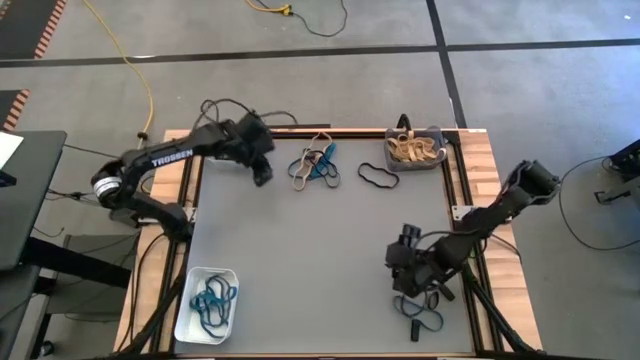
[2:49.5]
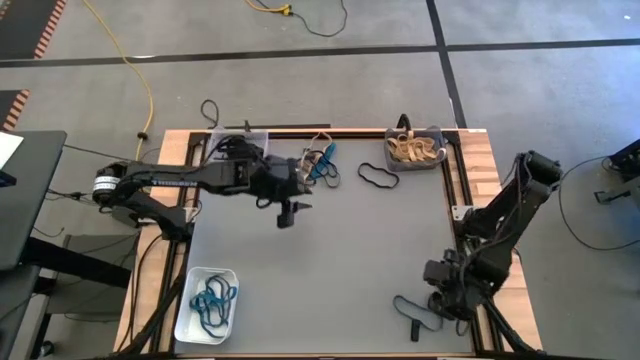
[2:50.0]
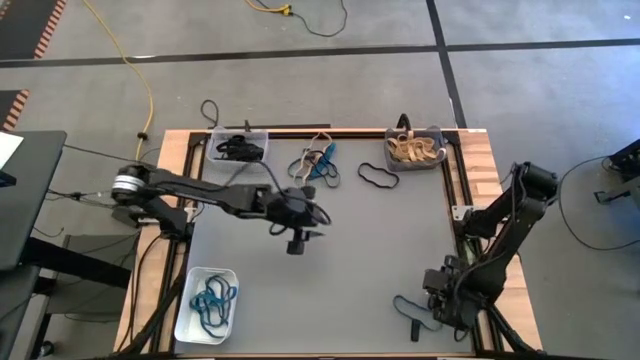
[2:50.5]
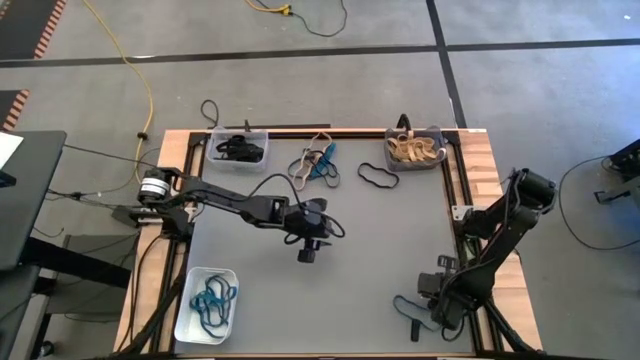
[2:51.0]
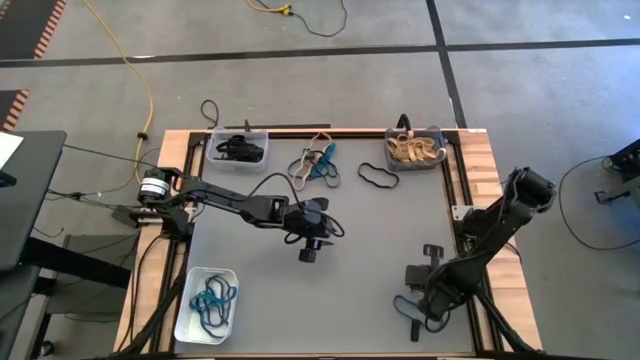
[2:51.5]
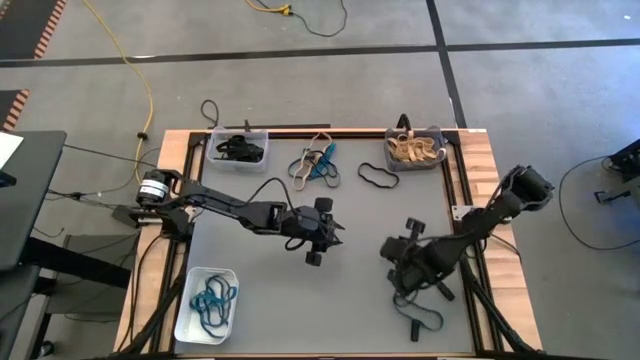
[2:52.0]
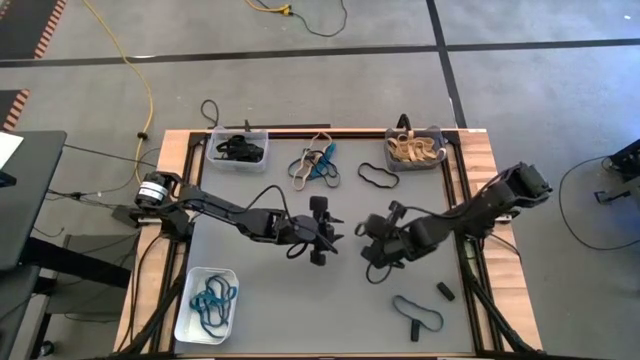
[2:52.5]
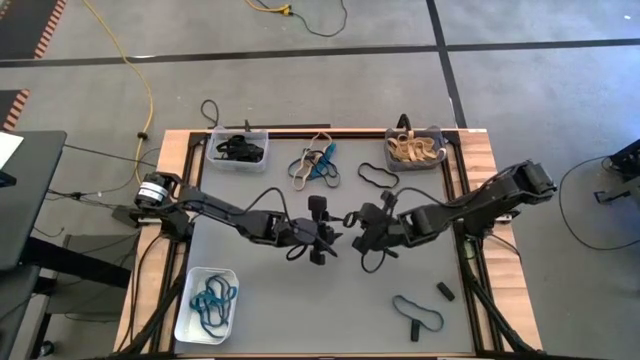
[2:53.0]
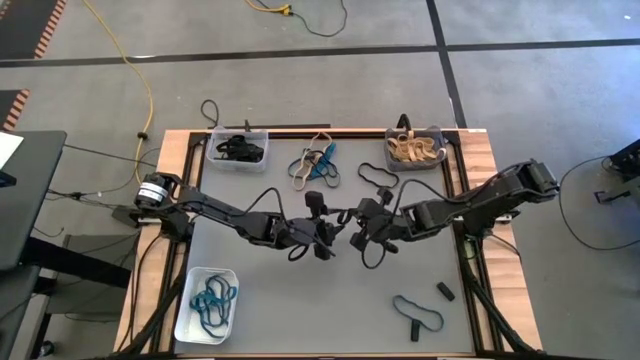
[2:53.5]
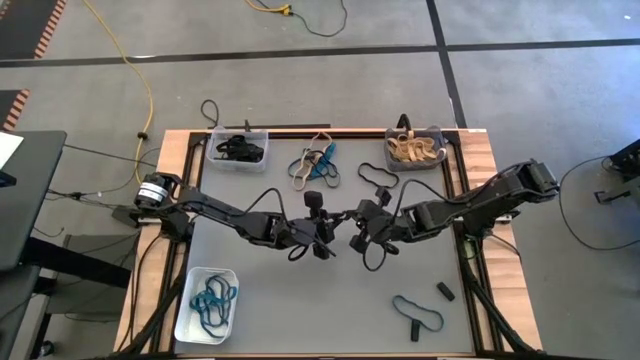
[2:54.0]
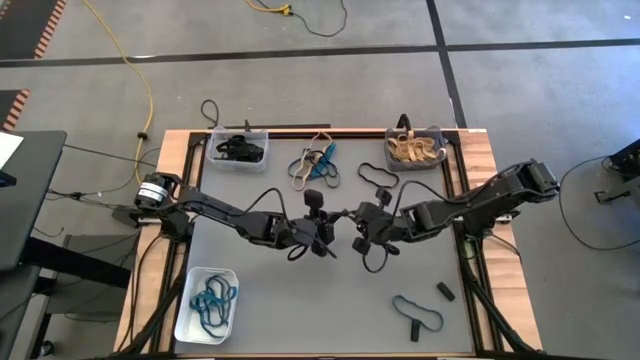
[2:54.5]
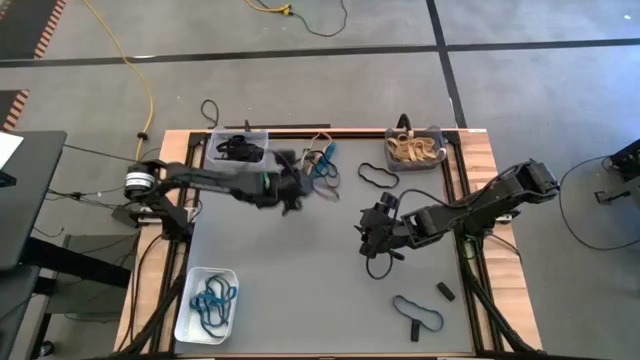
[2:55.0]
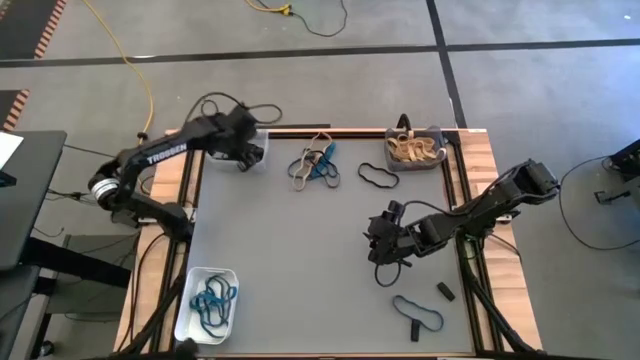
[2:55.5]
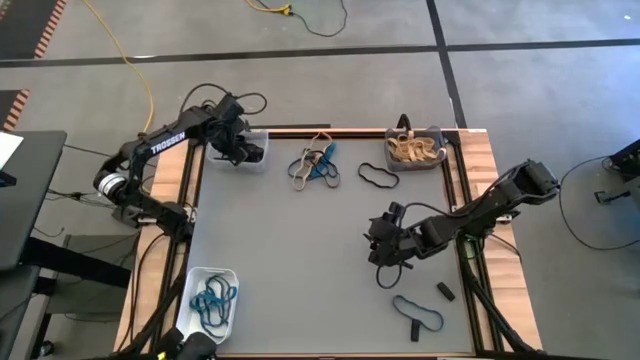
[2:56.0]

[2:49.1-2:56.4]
Task: Sort rubber bands into baskets
Put the black rubber band into the transparent bin

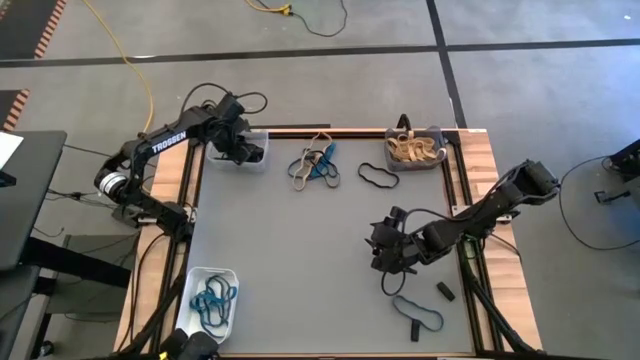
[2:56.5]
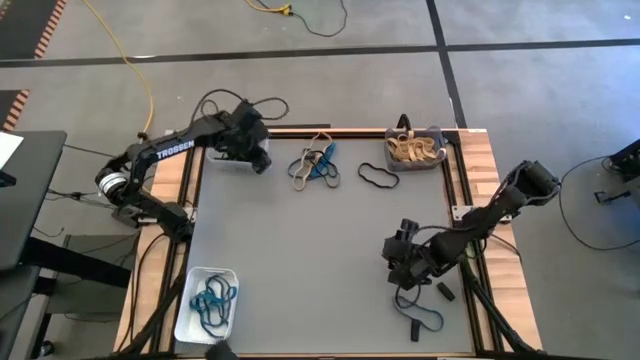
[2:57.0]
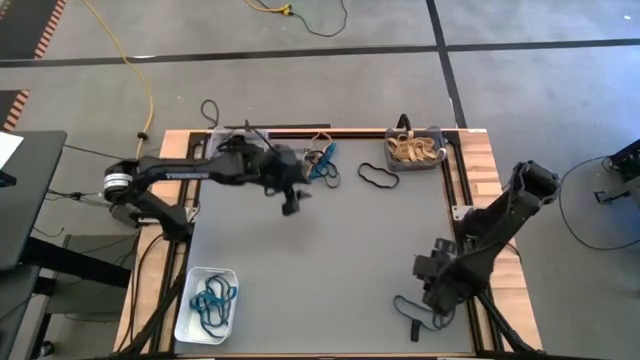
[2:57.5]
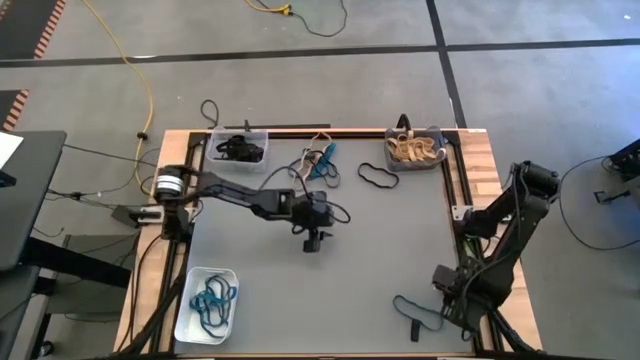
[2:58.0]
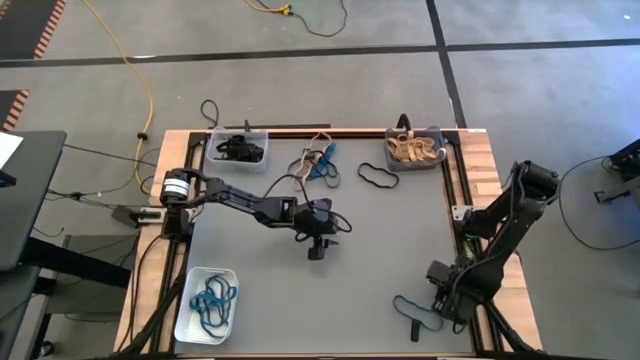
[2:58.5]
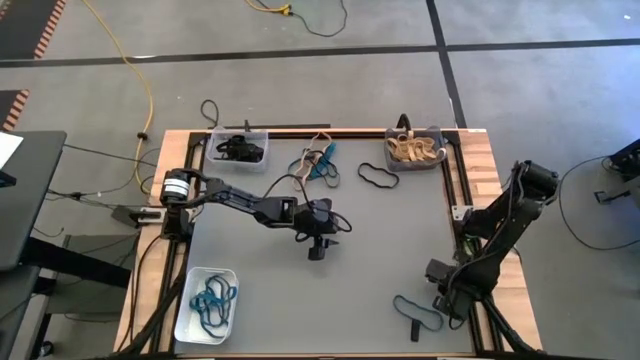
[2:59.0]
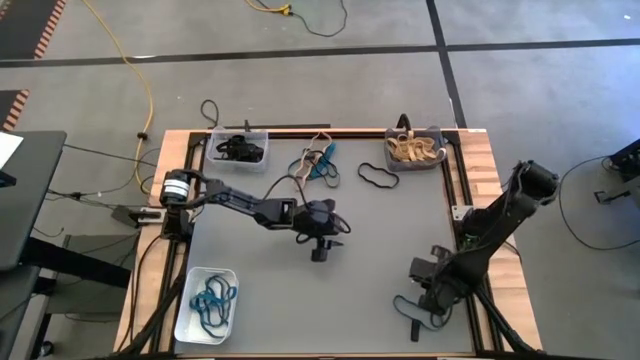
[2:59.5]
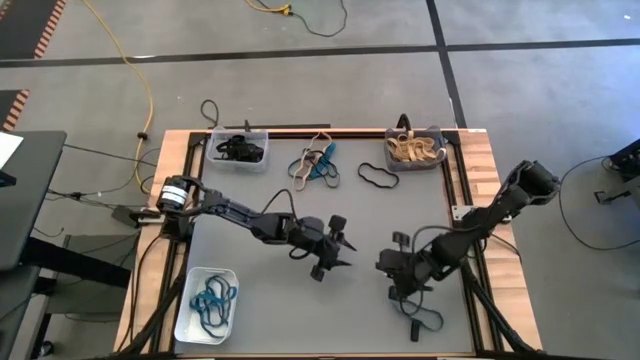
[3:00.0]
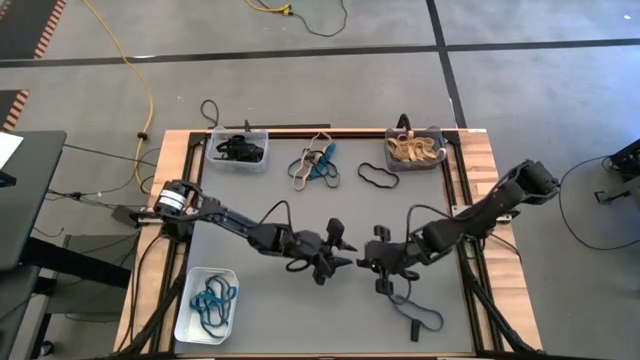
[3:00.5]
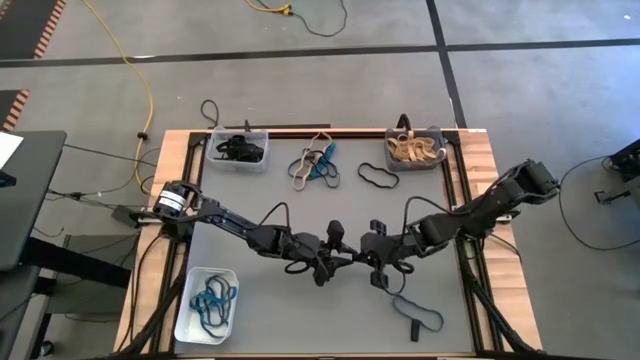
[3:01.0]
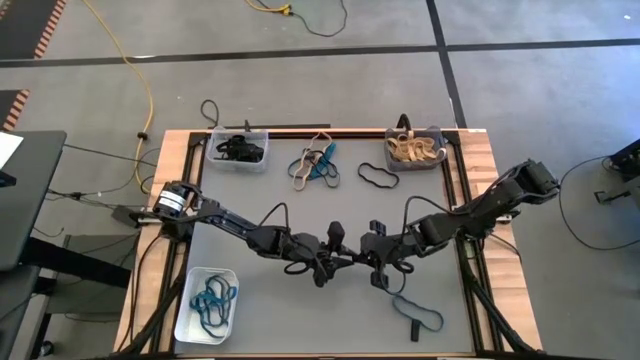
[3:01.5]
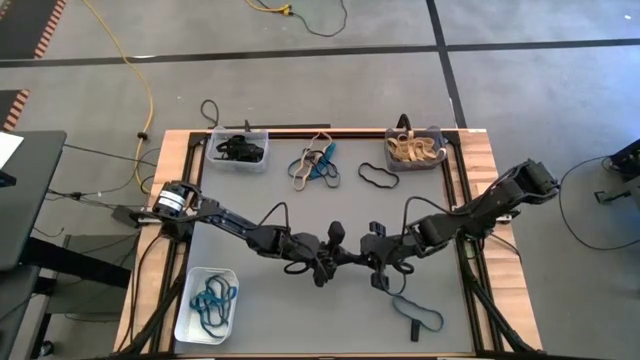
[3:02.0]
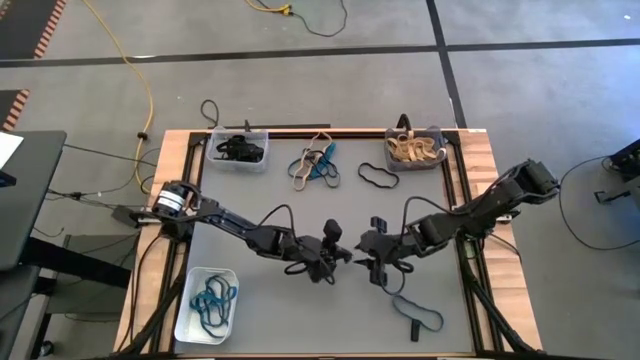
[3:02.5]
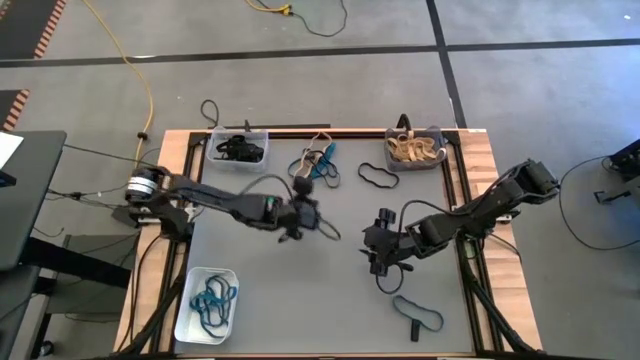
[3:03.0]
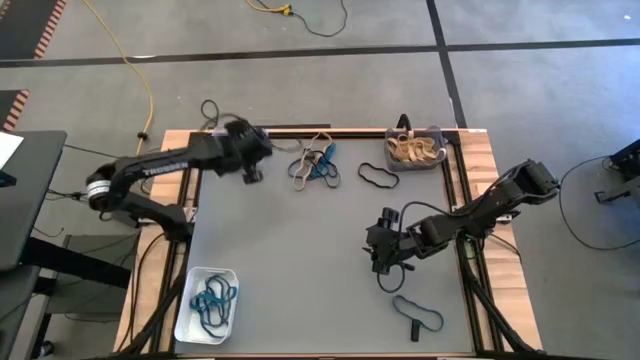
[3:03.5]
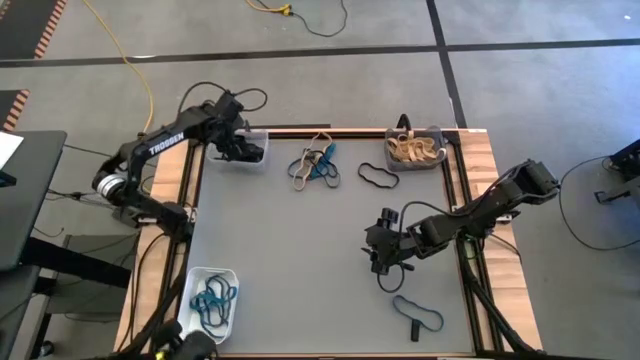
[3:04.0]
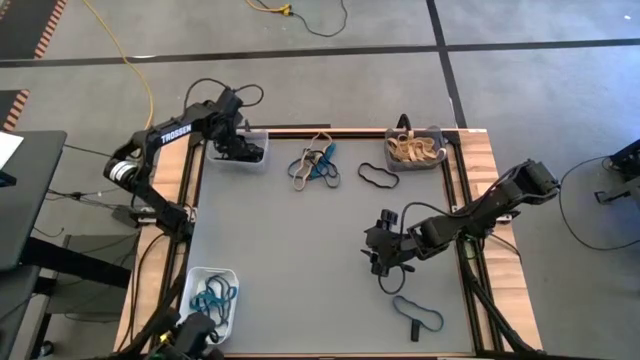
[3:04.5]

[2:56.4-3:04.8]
Put the black rubber band into the transparent bin

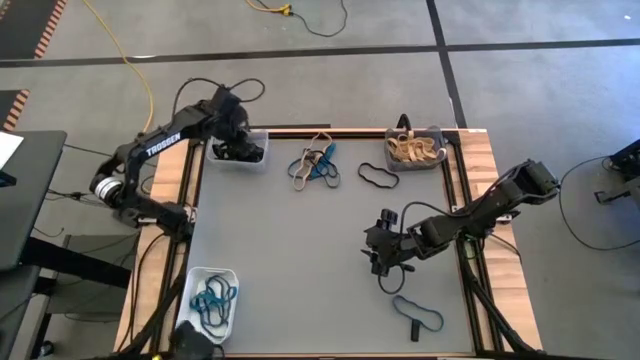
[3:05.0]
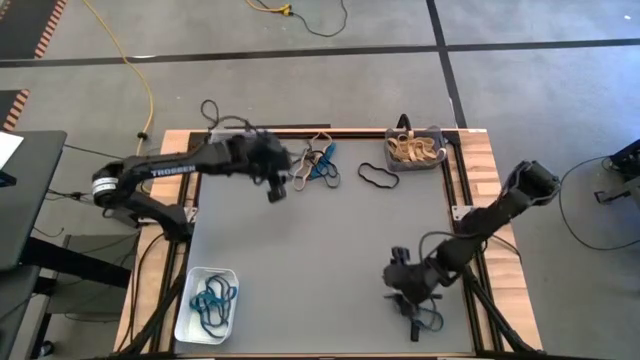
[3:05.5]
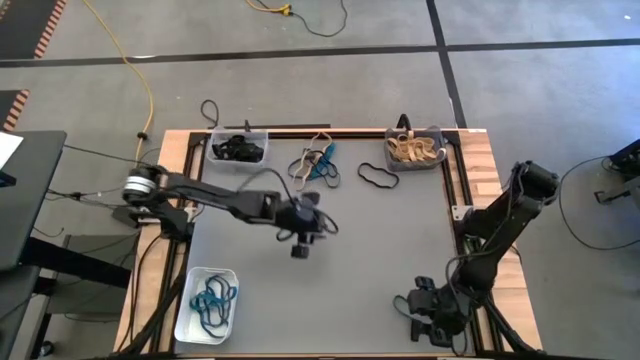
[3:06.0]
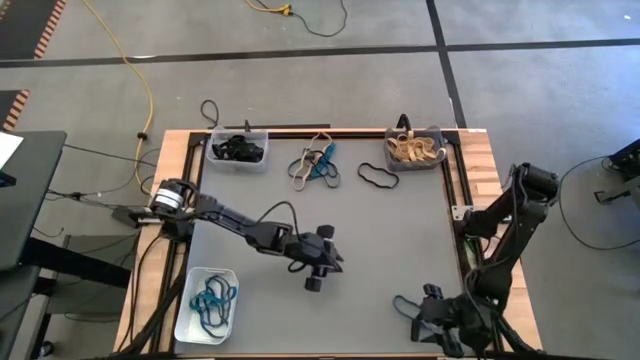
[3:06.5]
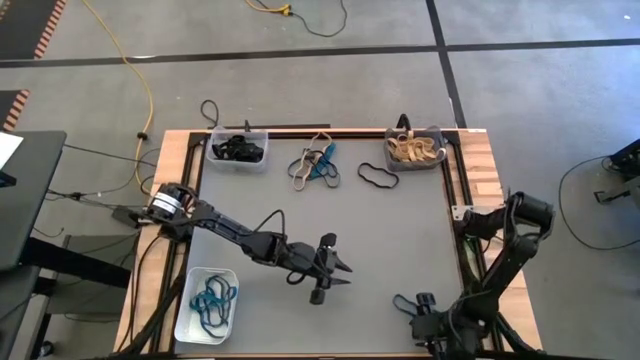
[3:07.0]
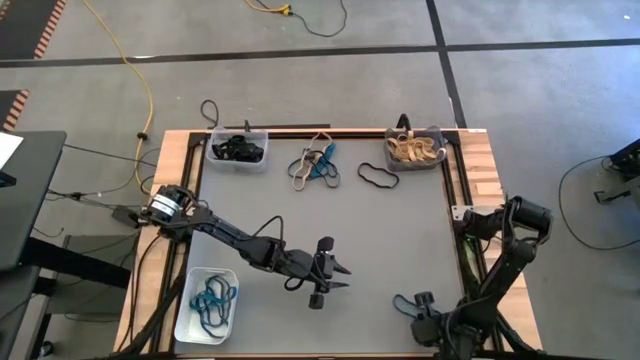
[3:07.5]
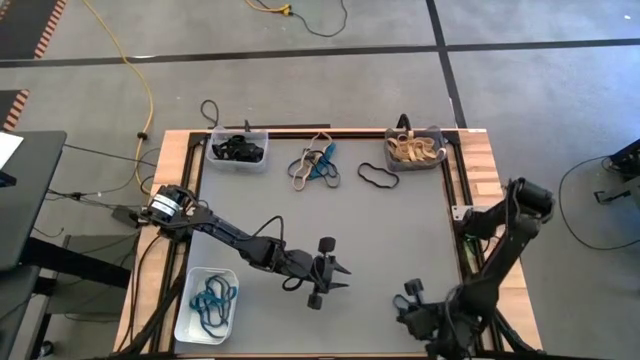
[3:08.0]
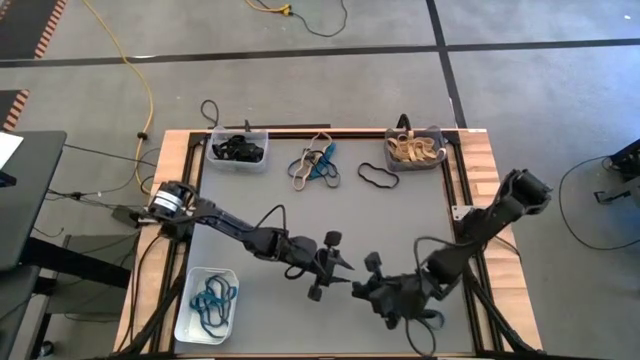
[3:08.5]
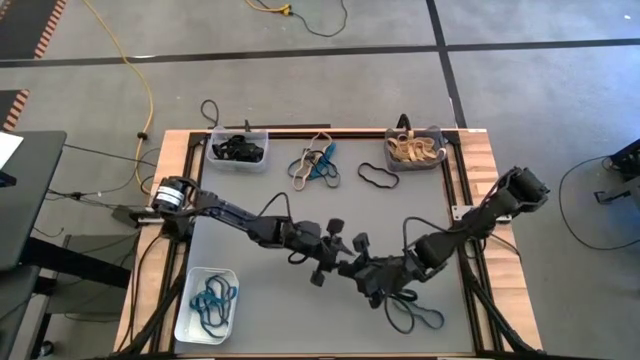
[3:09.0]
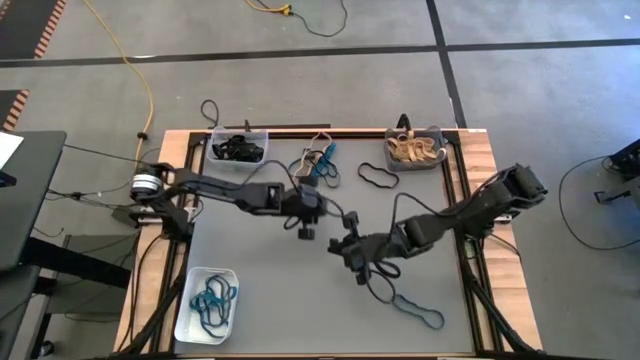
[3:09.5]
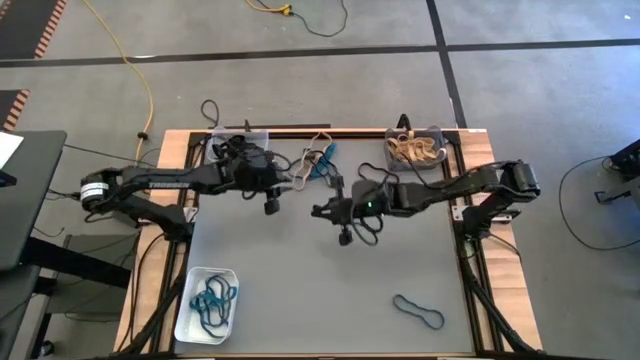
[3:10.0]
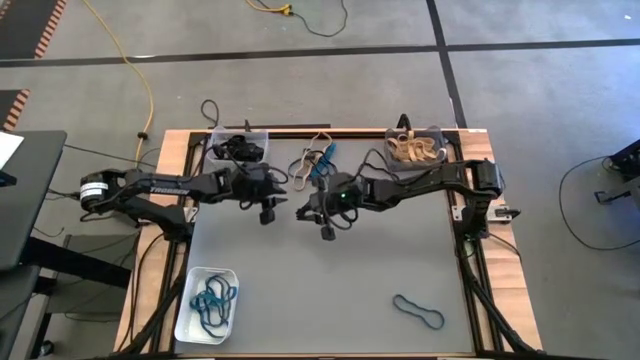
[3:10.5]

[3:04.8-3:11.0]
Put the black rubber band into the transparent bin

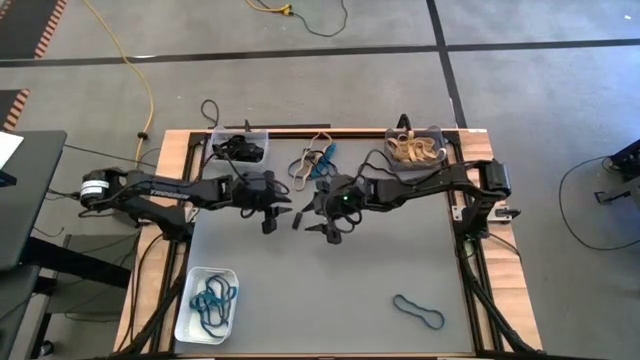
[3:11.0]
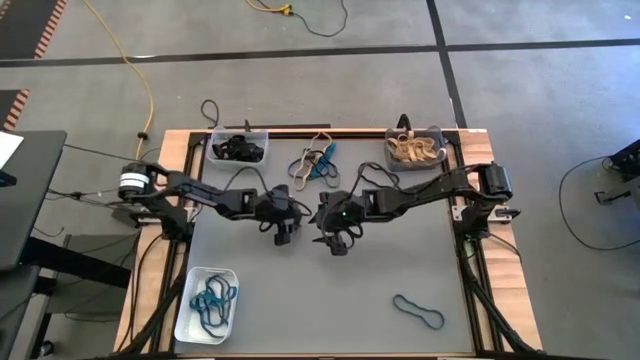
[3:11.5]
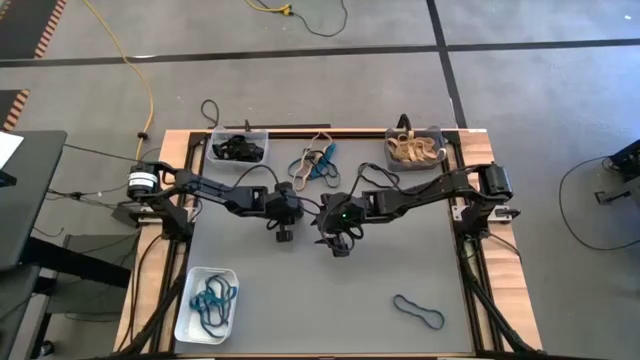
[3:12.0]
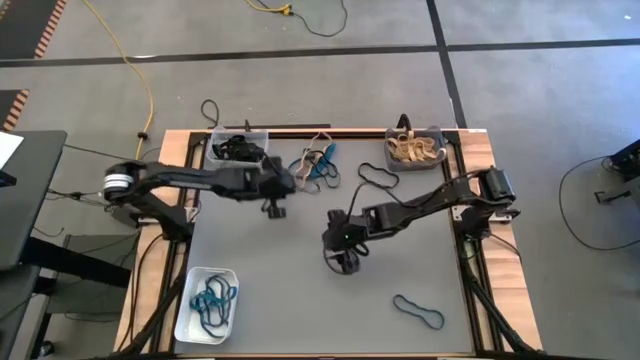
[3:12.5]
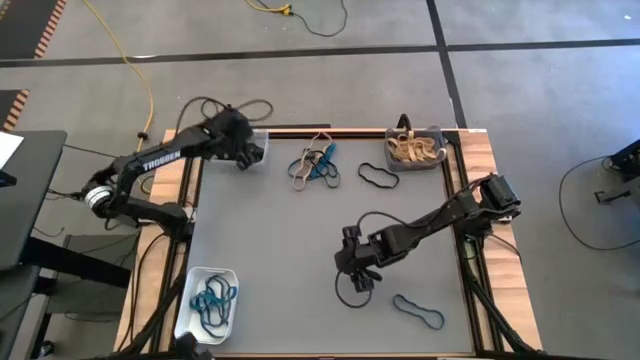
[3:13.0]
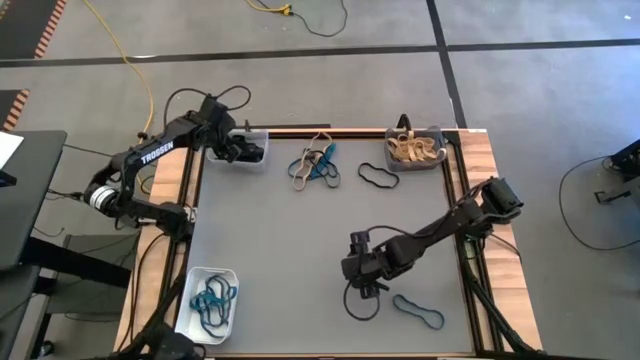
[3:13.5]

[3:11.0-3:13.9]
Put the black rubber band into the transparent bin
